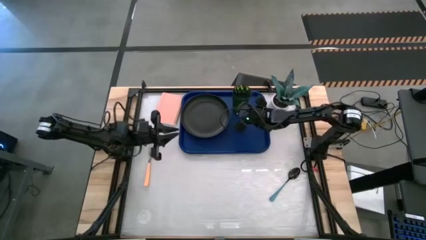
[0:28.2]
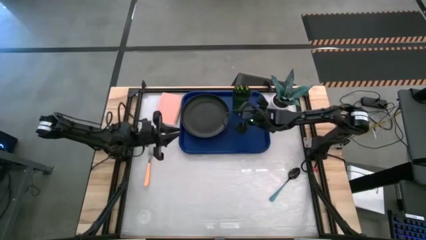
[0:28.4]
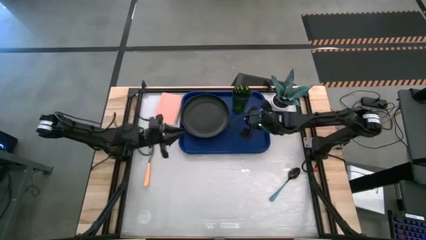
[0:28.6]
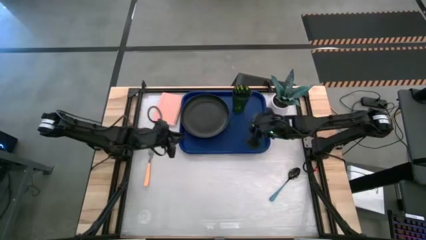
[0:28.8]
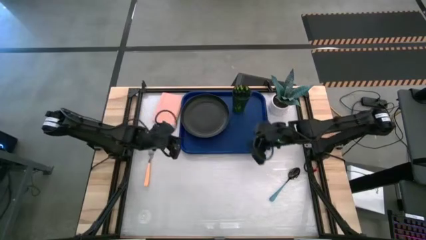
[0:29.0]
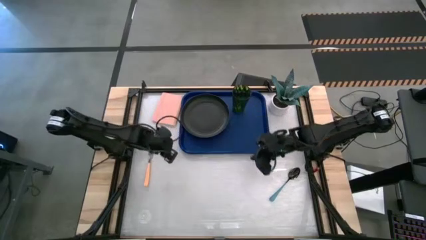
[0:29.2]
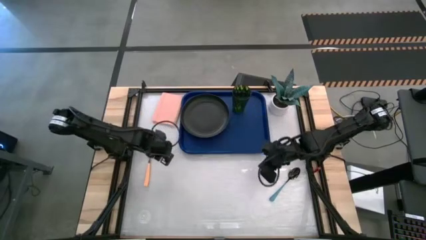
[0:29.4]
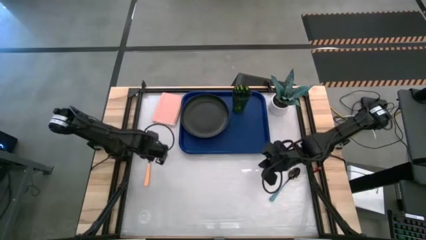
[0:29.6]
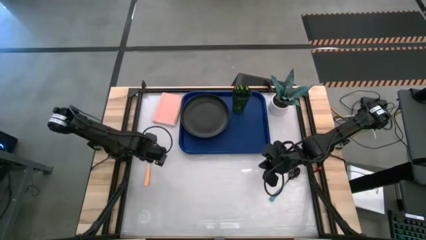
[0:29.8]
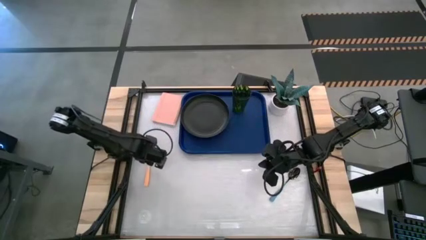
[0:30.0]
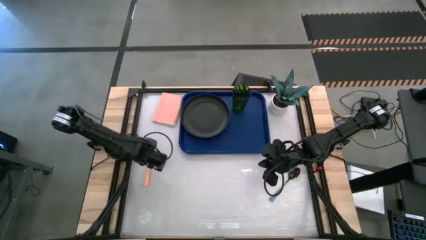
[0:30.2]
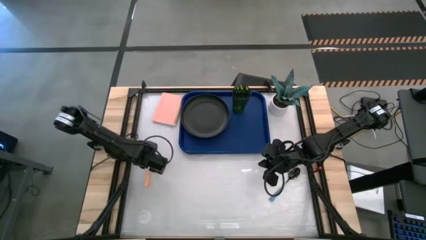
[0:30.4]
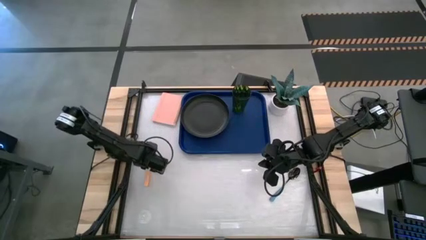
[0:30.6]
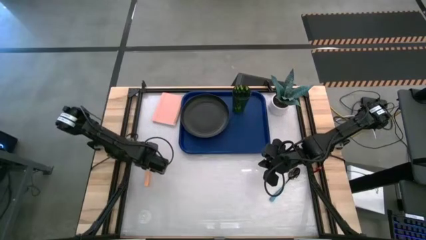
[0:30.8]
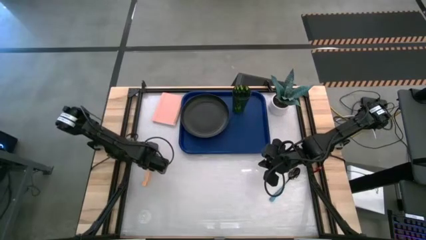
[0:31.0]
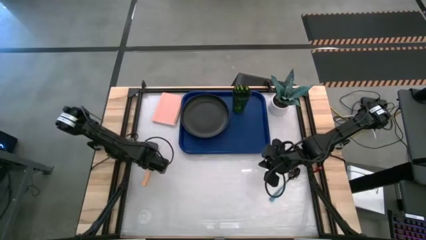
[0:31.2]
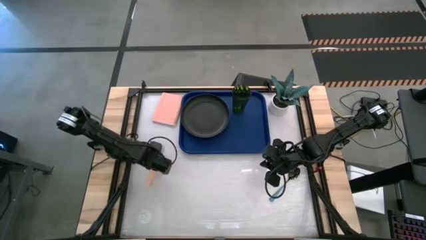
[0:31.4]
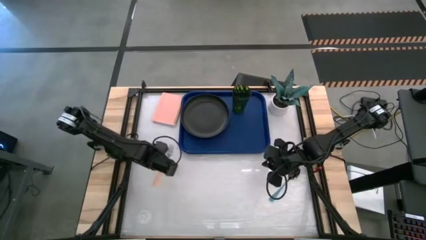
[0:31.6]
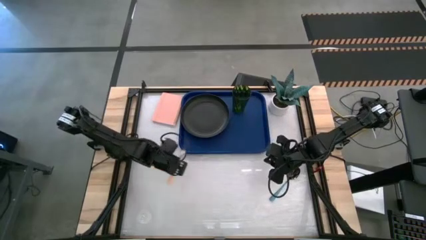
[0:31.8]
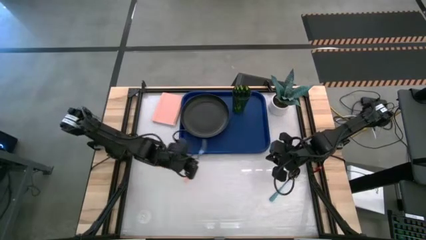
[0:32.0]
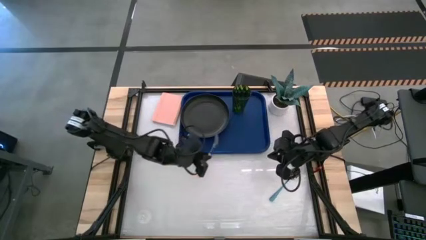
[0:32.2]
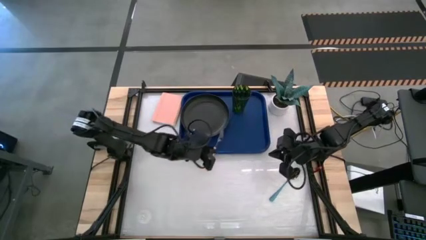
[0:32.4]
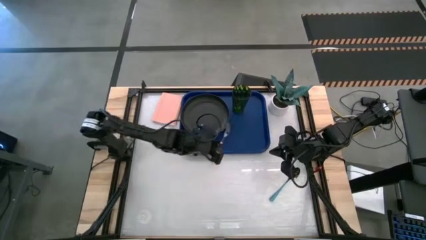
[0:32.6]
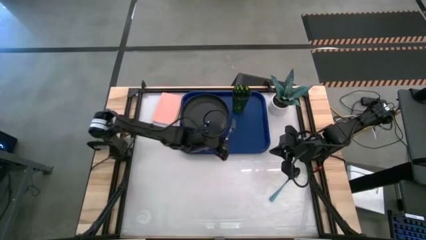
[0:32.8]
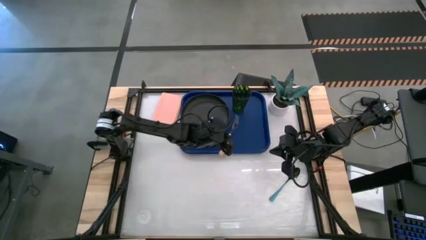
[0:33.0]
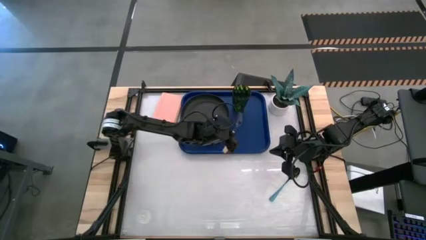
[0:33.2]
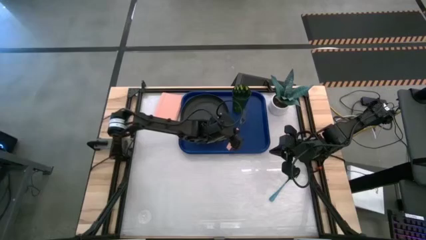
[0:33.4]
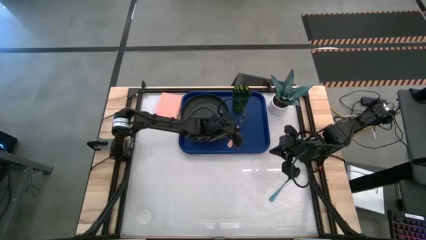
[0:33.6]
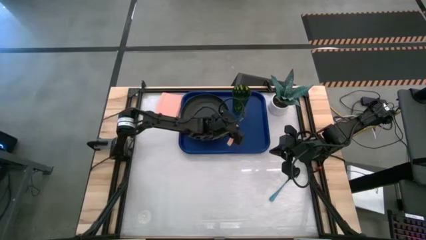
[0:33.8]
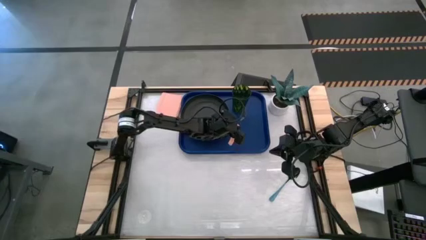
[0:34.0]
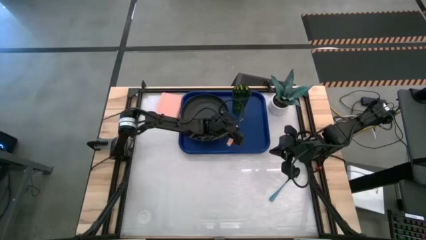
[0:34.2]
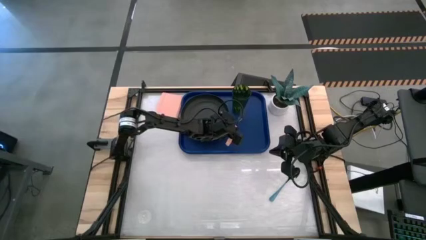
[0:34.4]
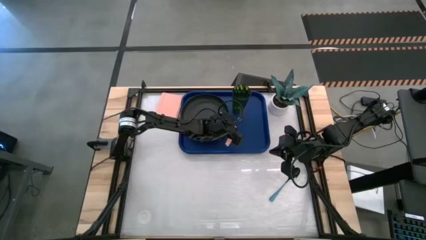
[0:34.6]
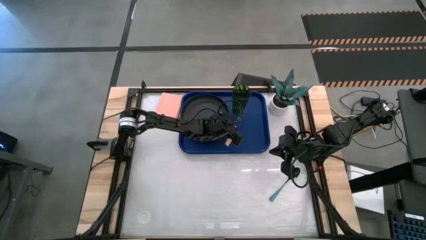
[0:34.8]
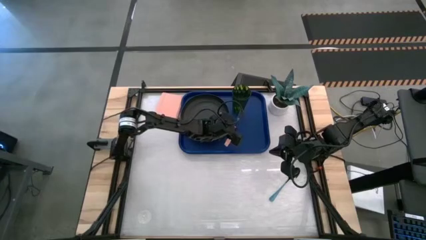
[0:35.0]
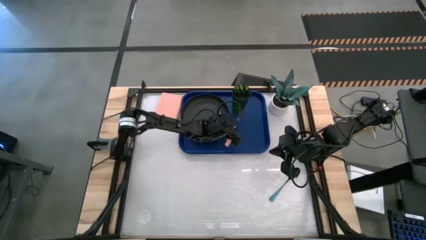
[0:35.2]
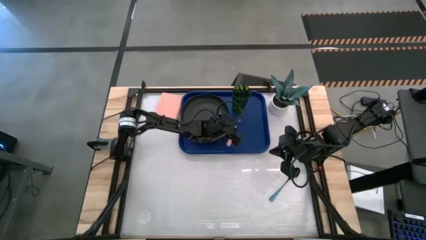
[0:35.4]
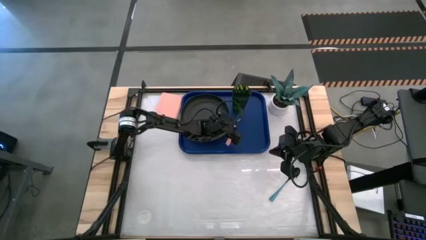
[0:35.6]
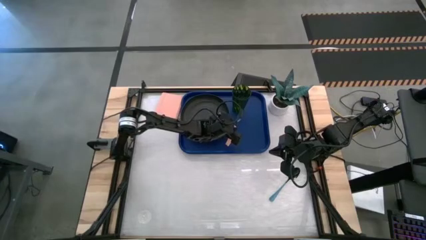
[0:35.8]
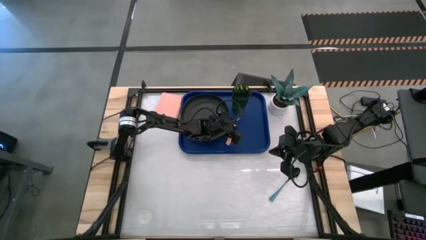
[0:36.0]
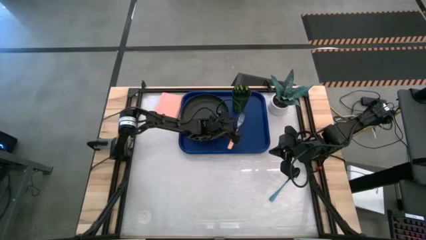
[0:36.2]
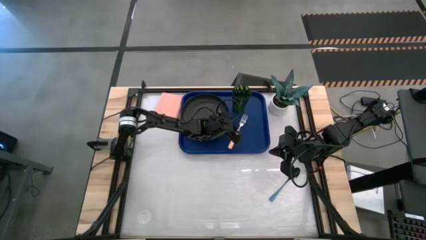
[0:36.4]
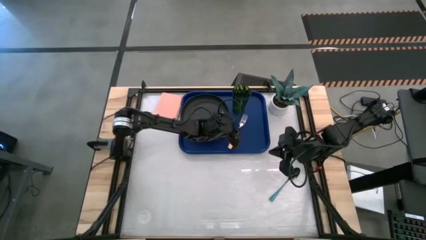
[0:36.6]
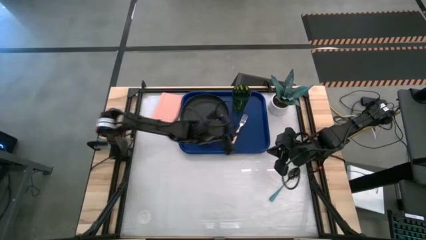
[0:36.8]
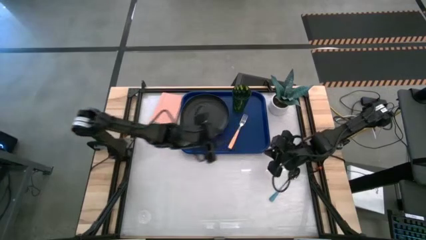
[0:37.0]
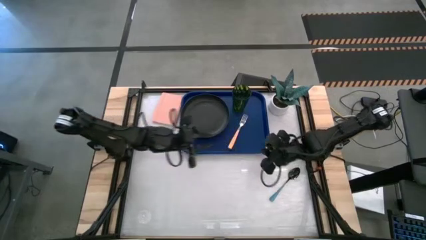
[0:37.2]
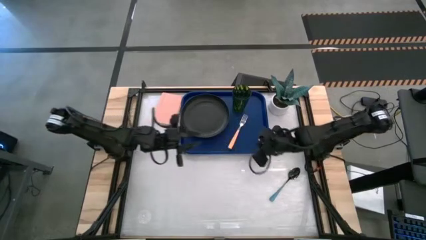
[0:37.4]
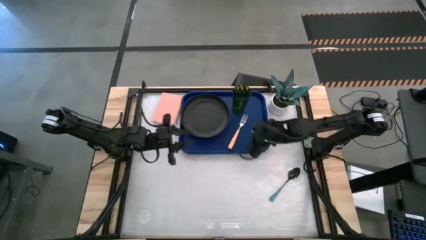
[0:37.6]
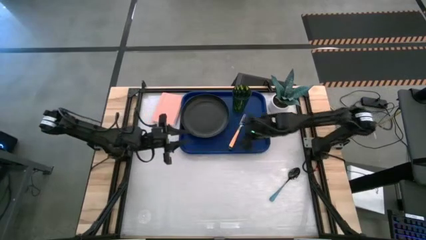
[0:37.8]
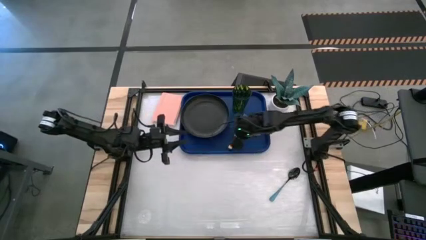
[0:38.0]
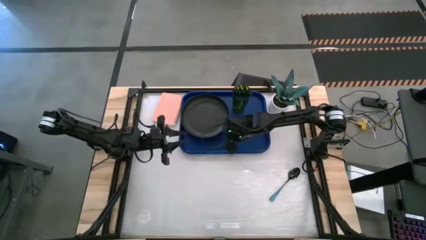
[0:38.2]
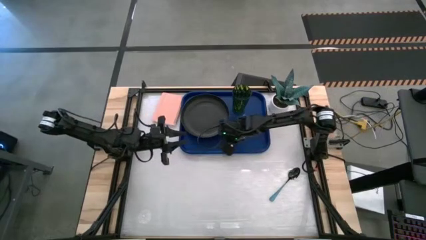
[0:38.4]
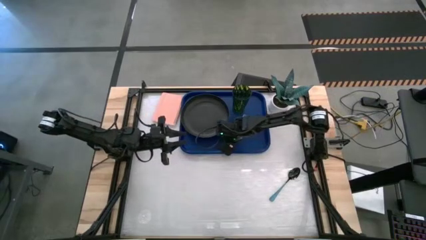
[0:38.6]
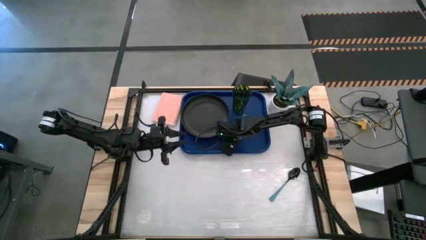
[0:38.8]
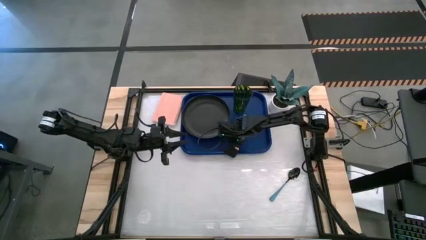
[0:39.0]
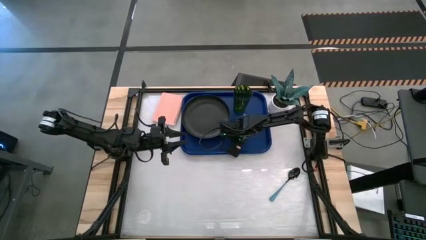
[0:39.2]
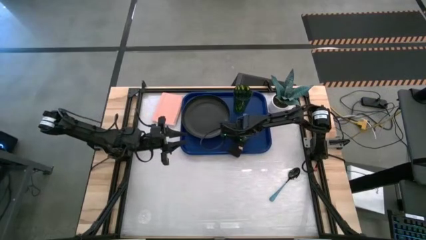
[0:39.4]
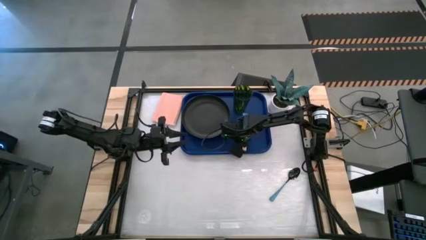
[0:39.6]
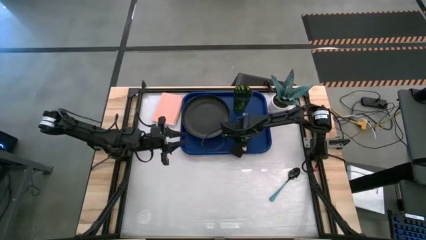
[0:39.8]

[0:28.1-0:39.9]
Task: Pick and place plate/cup/fork/spoon on tray
Put the orange fork on the blue tray to the right of the black plate

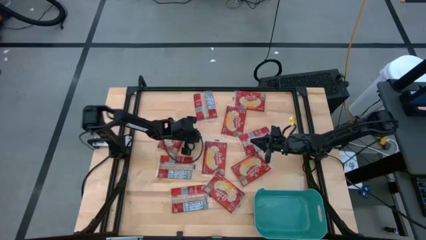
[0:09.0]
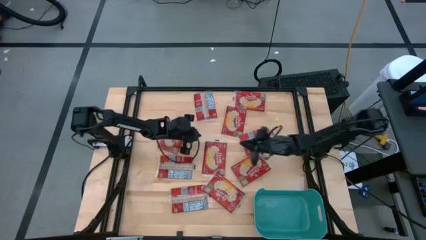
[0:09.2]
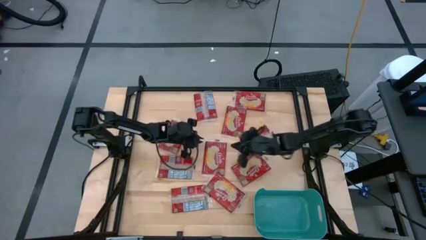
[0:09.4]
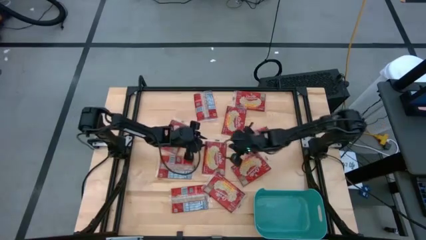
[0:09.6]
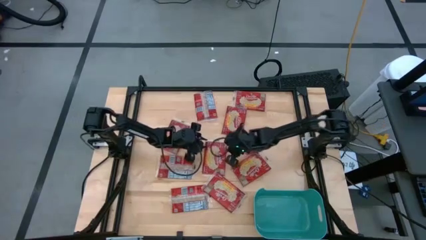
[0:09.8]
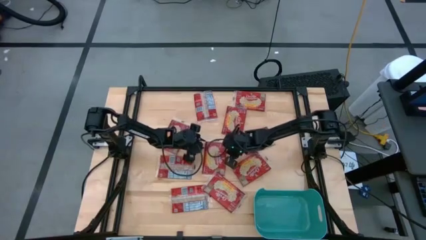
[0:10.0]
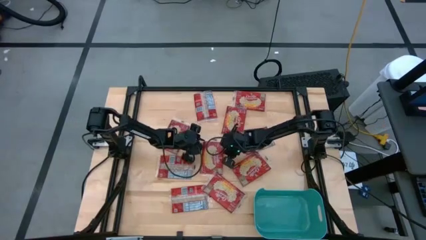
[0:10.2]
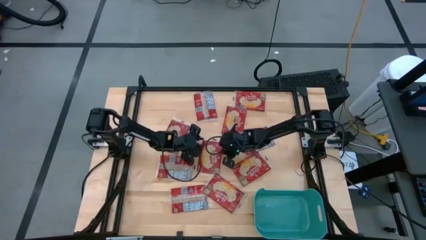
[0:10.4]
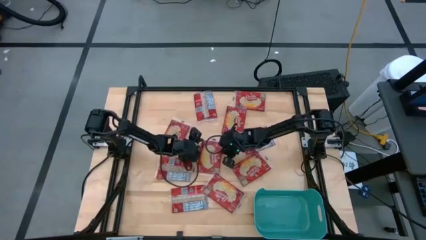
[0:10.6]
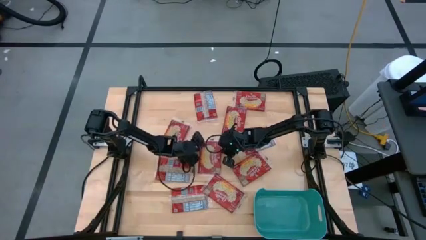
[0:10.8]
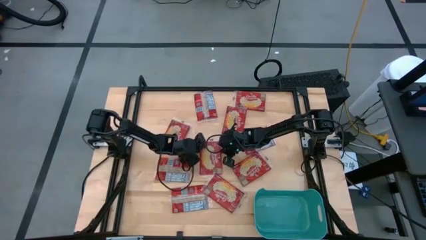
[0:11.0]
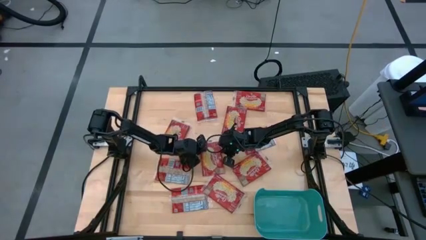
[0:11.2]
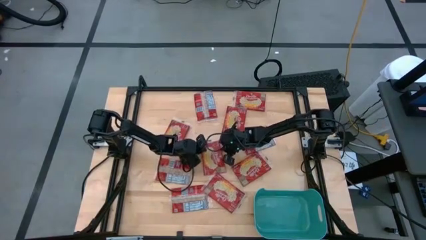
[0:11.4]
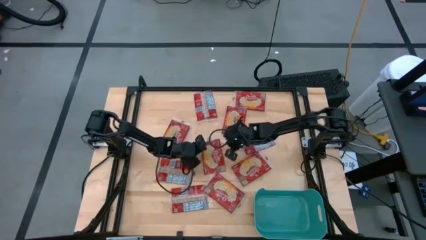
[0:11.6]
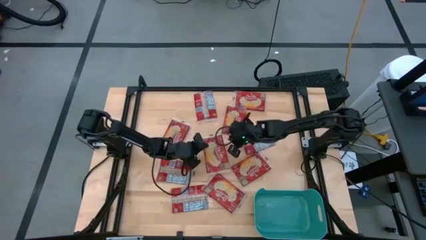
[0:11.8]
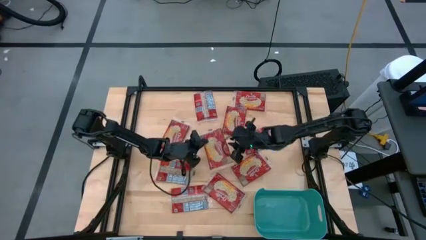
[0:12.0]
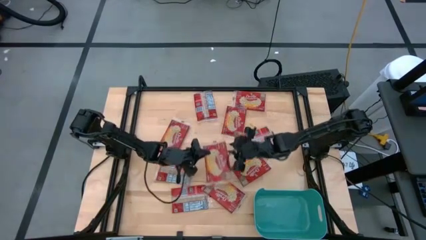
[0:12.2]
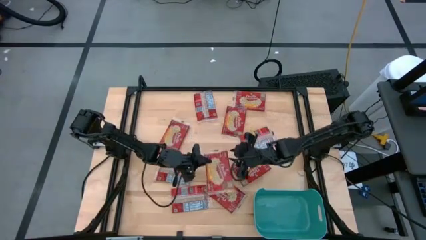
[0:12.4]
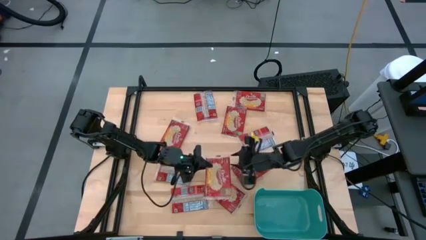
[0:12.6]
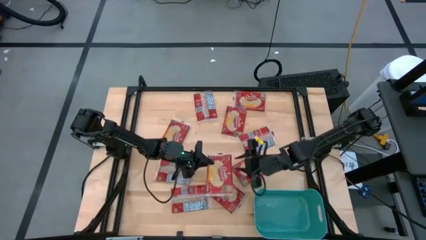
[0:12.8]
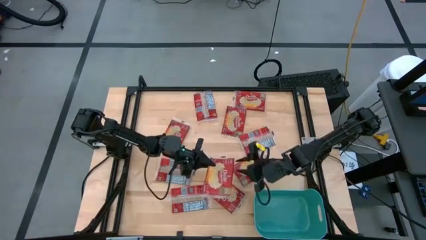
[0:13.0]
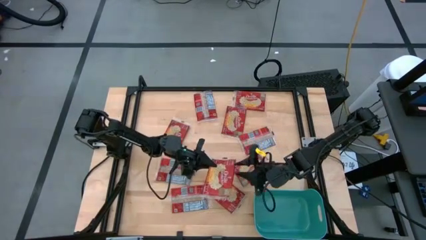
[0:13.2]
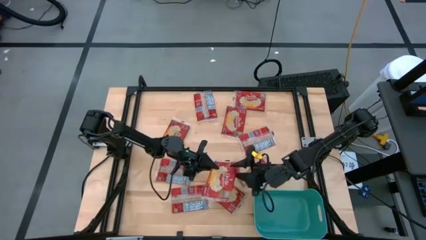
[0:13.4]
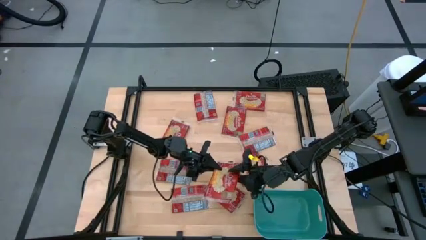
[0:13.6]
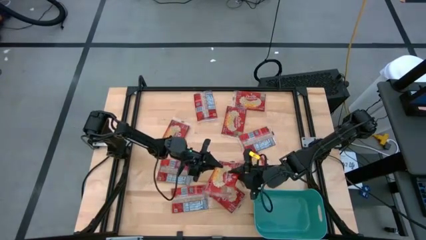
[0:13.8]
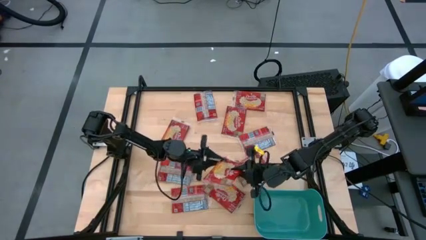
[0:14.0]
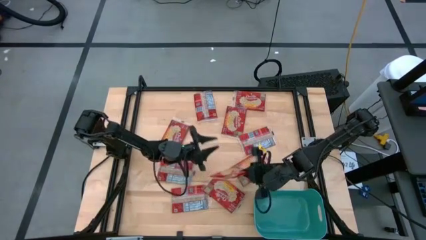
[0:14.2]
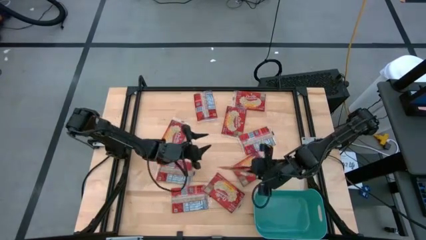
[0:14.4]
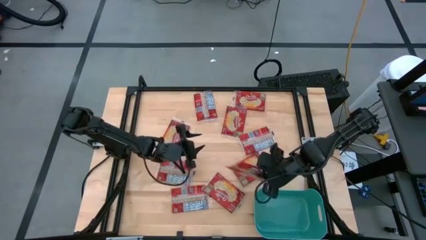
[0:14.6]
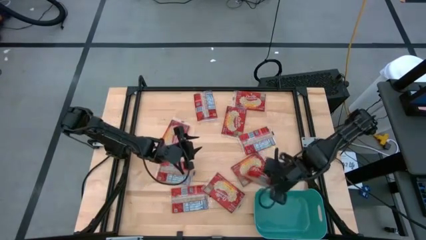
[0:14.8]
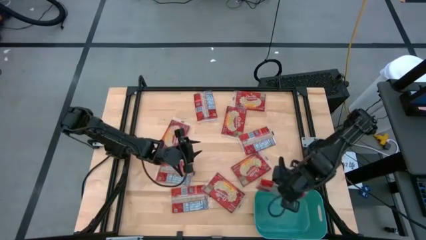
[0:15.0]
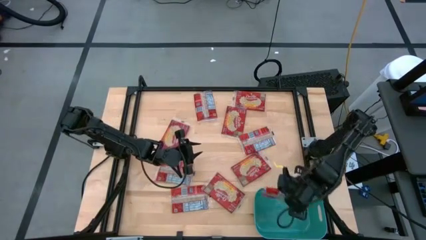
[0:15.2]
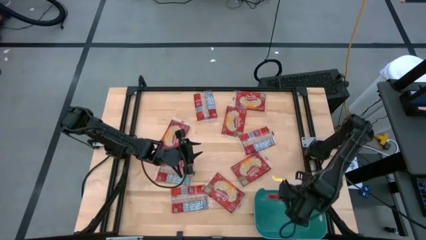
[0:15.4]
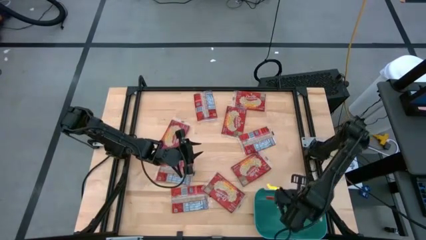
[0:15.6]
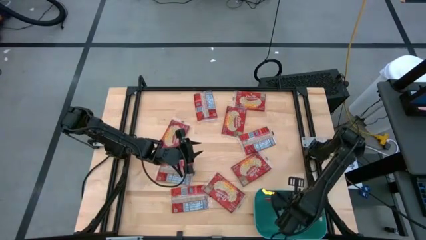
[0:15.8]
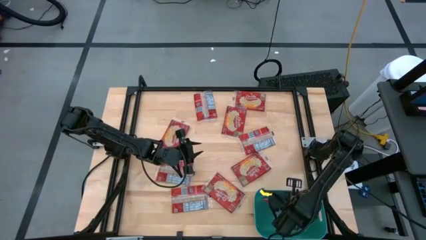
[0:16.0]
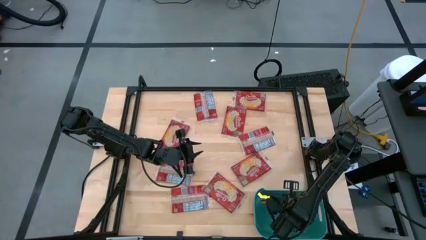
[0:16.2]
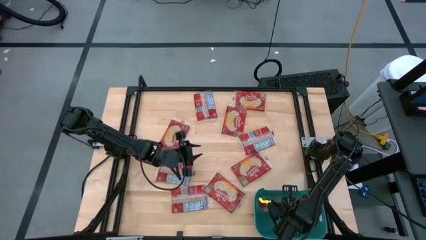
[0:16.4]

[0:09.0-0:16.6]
Task: Sort popcorn bags into baskets
Put the popcorn bag into the green bin
